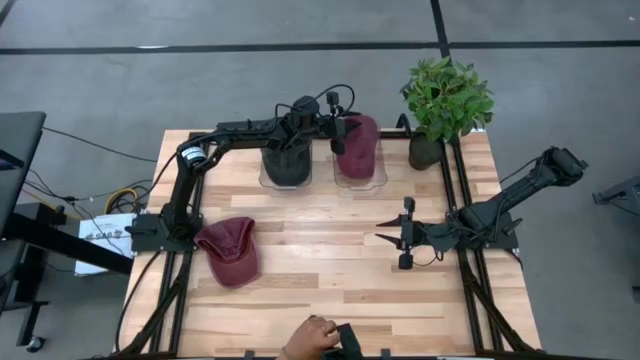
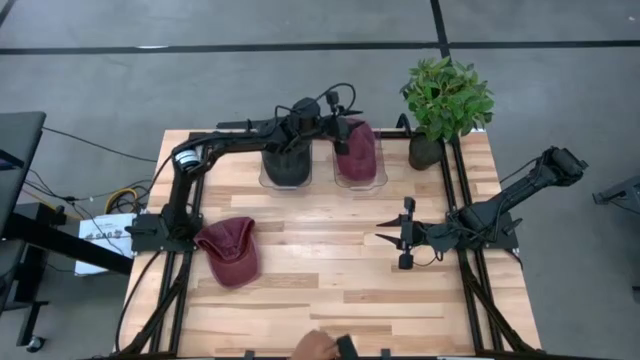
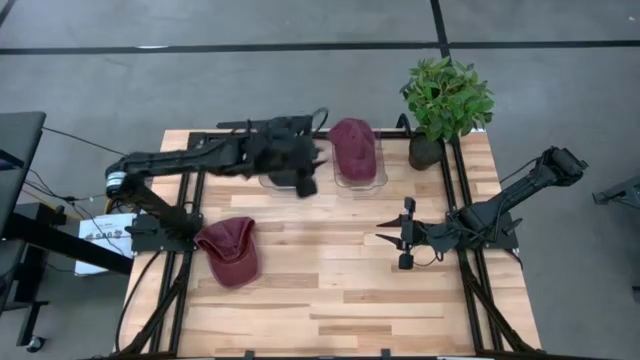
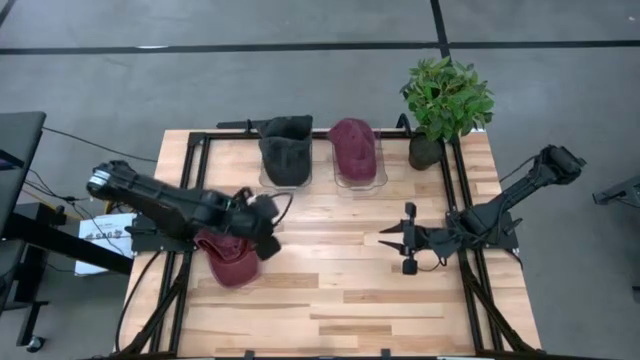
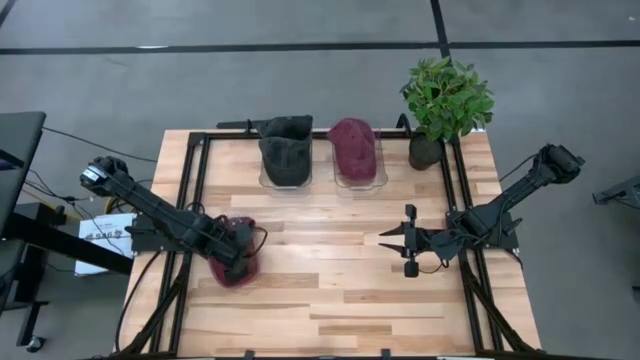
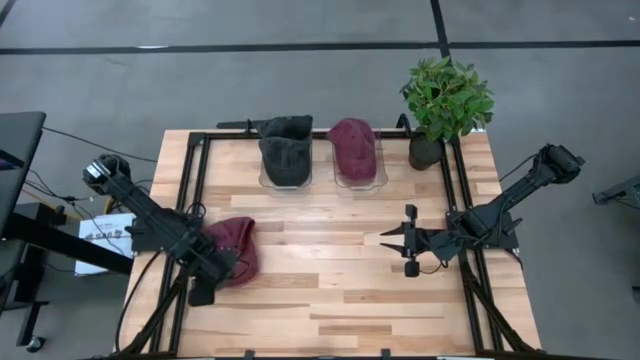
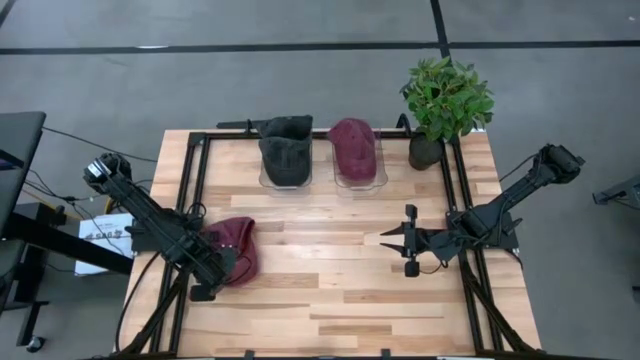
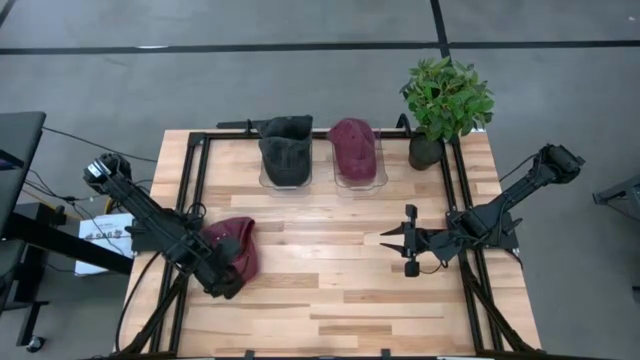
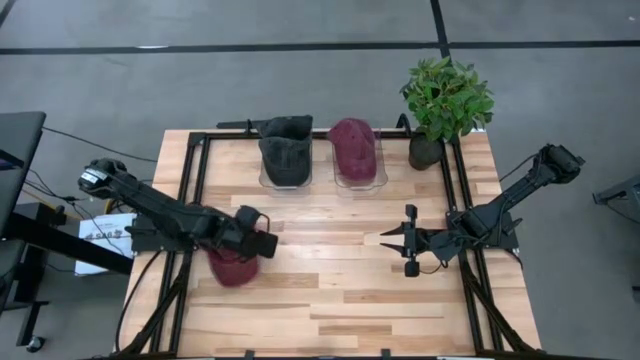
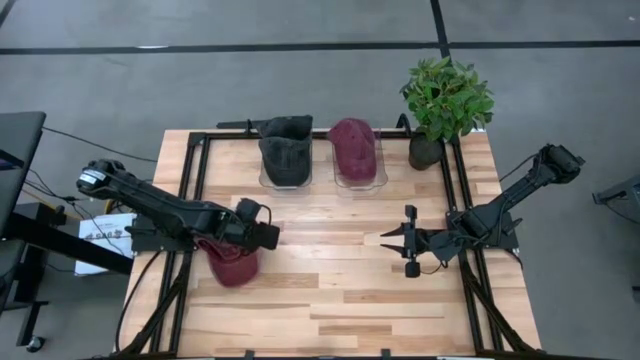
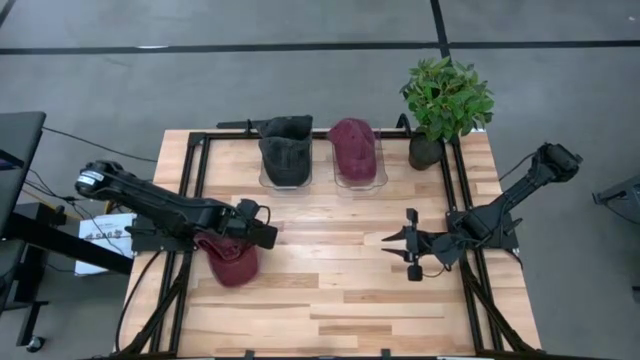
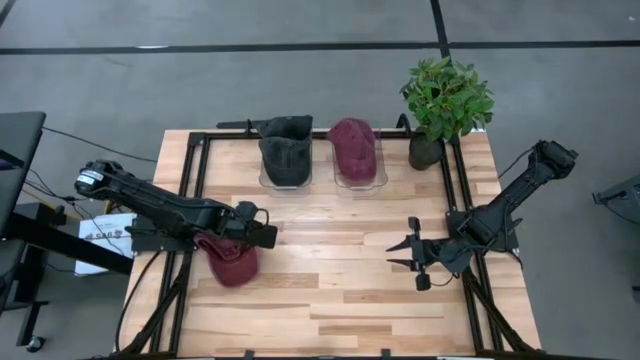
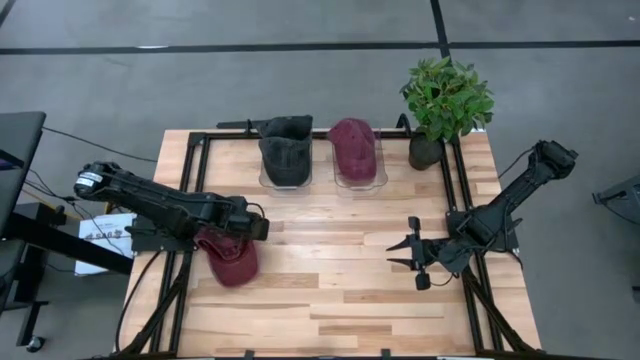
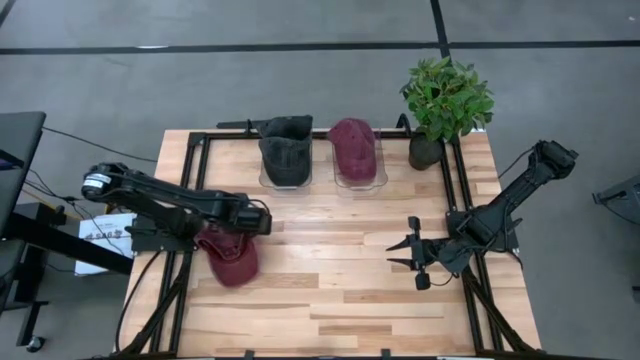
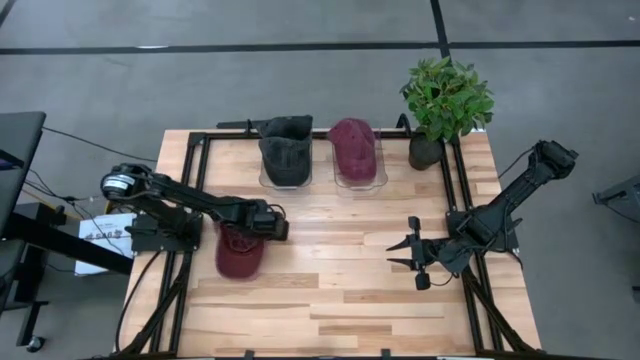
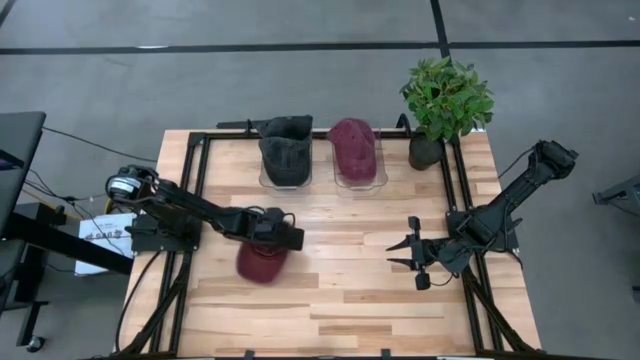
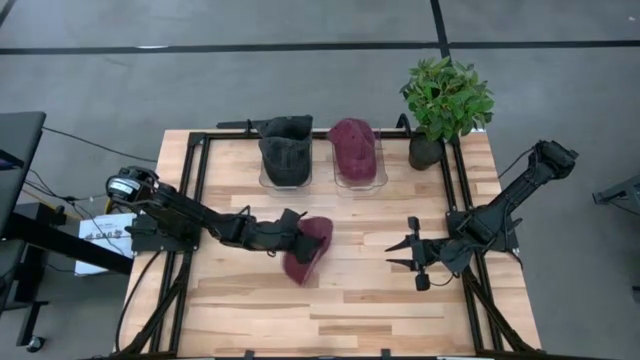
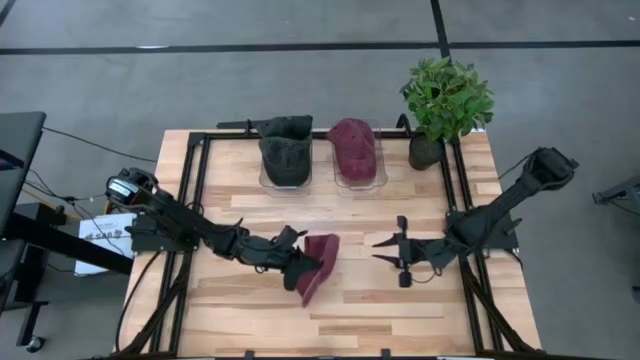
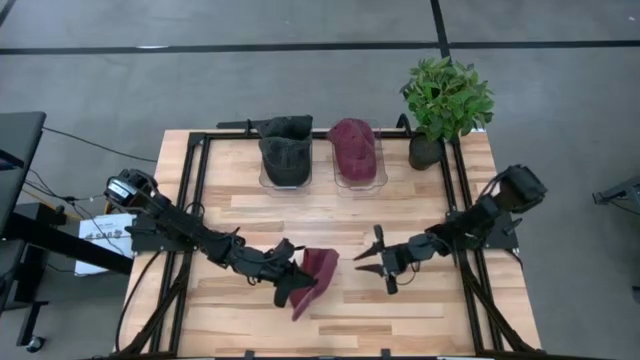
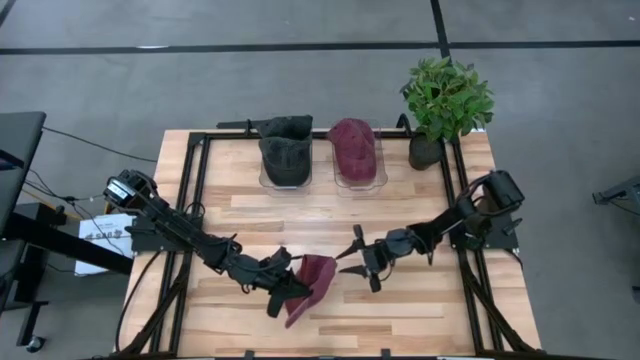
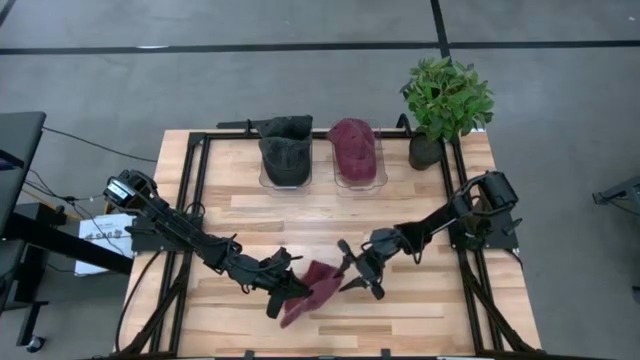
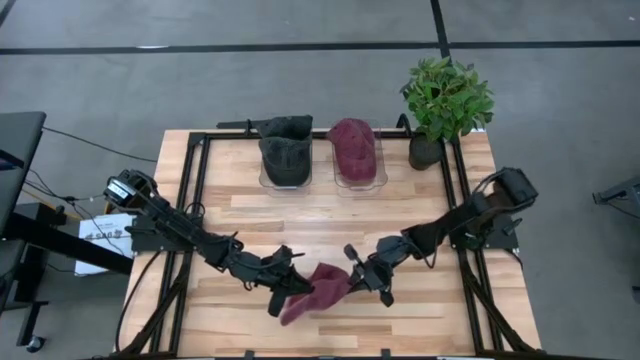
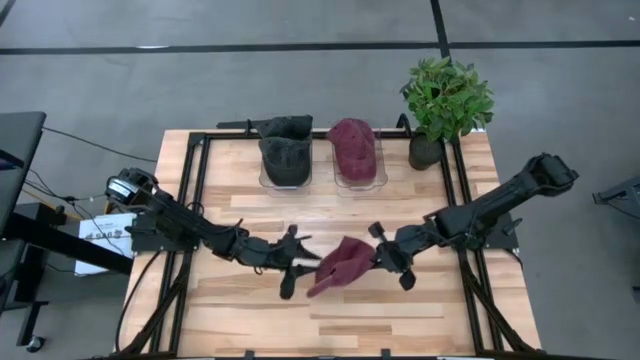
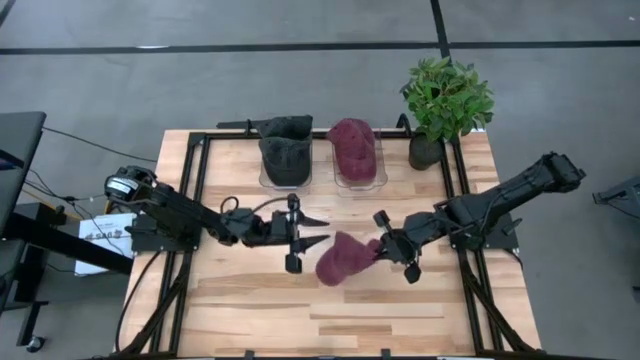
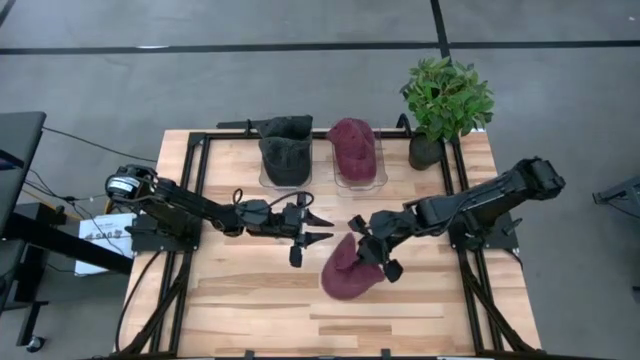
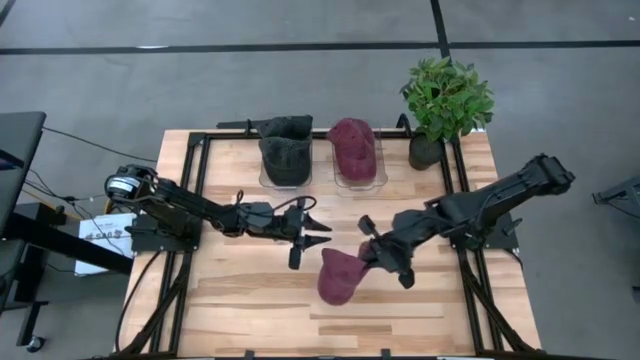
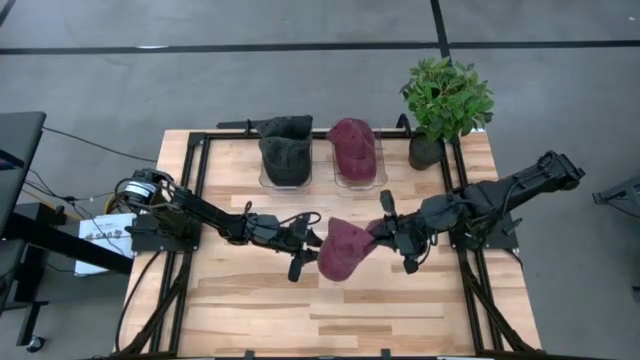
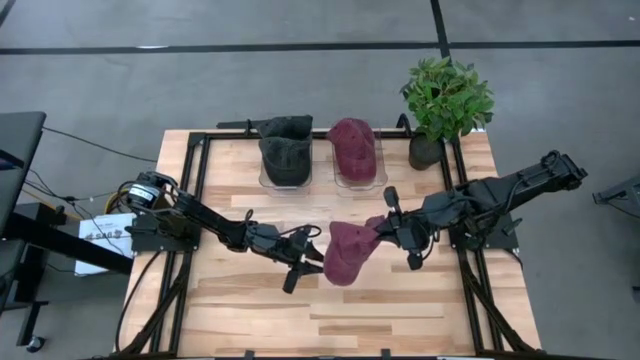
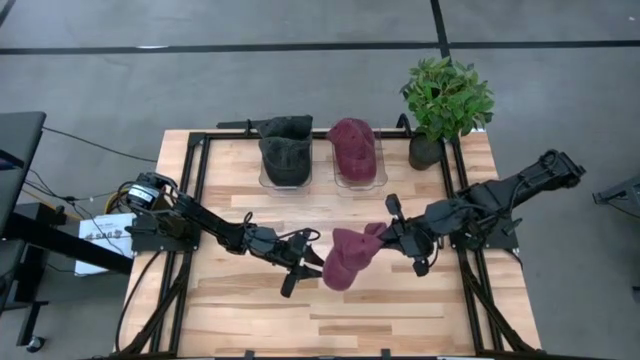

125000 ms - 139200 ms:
Task: Pick & Place hat
Put the red cap into the right transparent bin

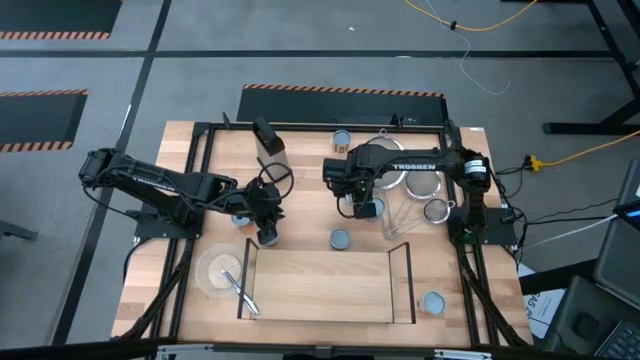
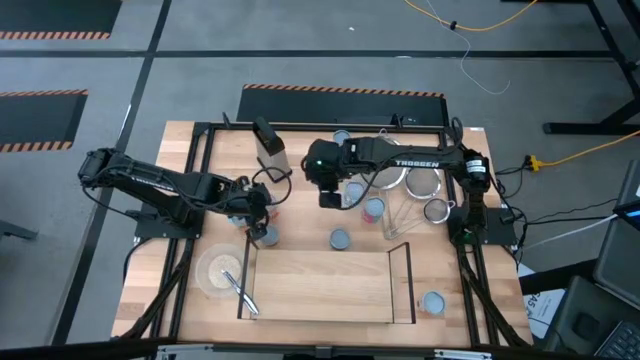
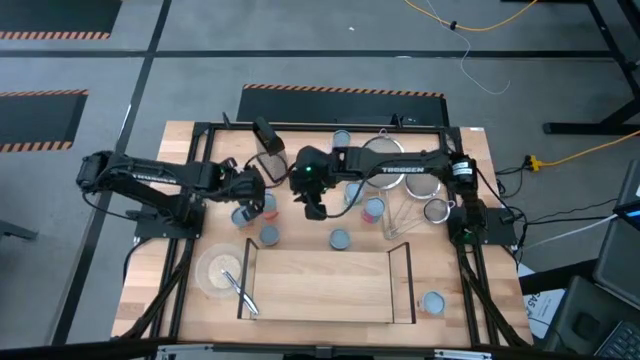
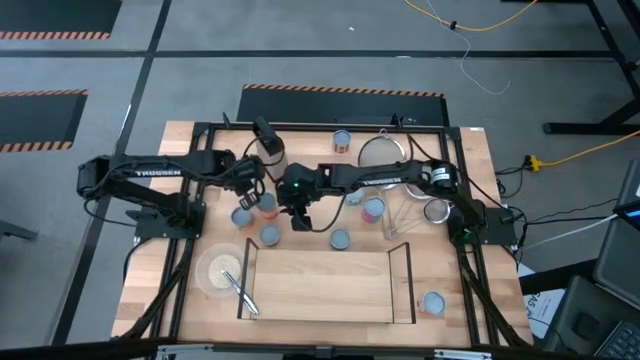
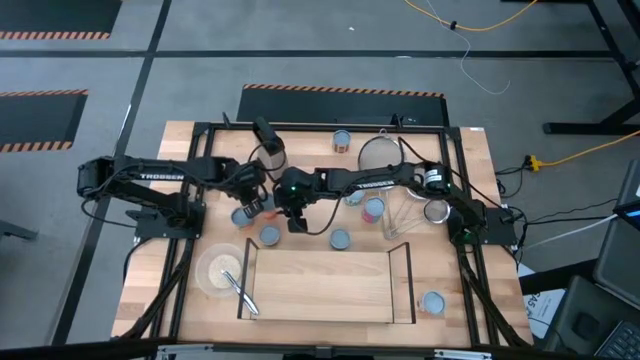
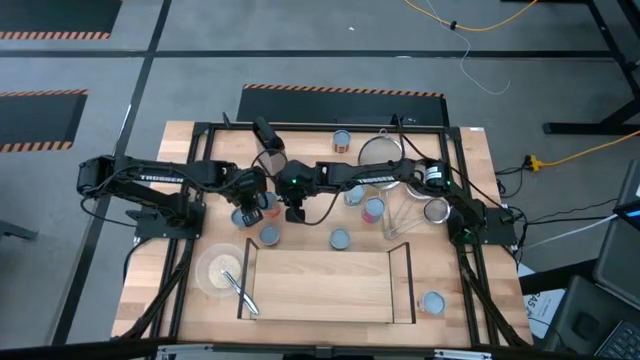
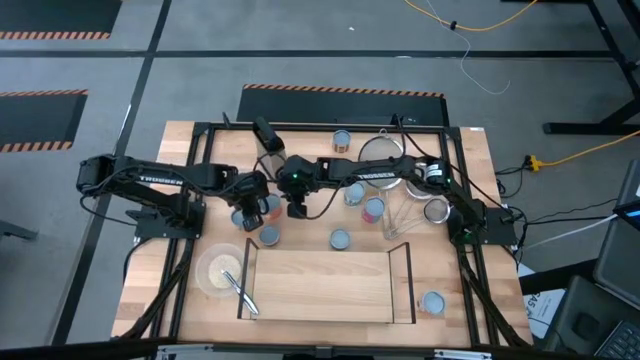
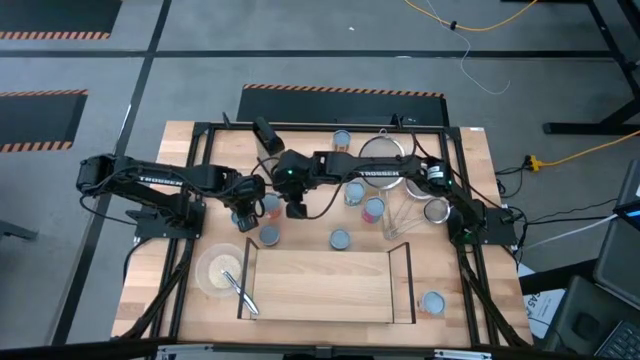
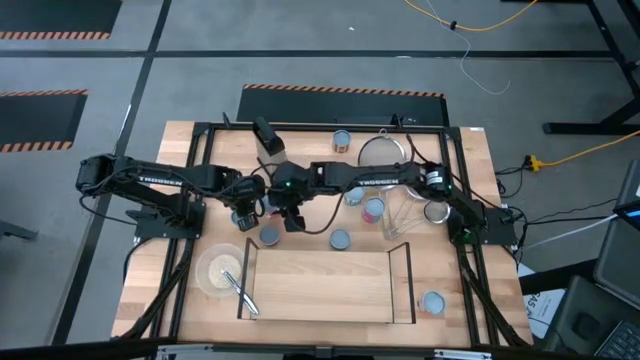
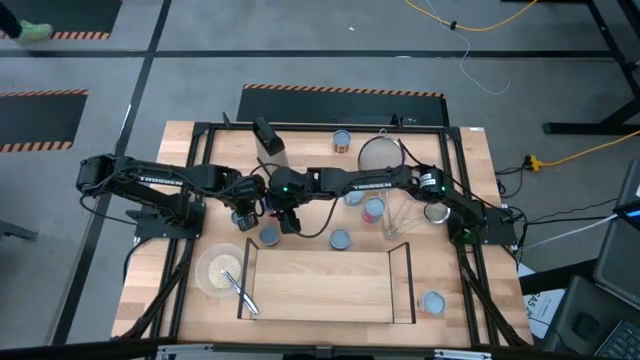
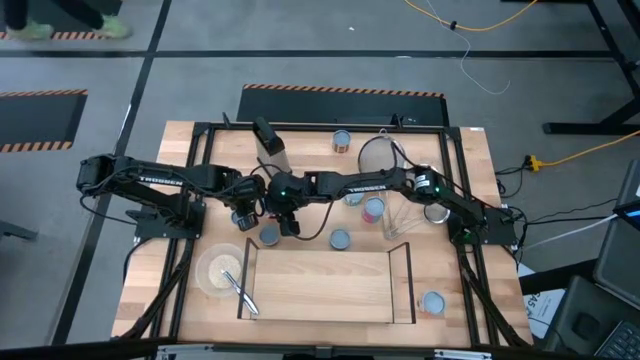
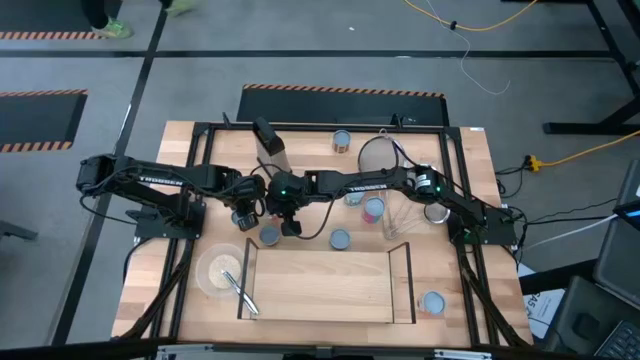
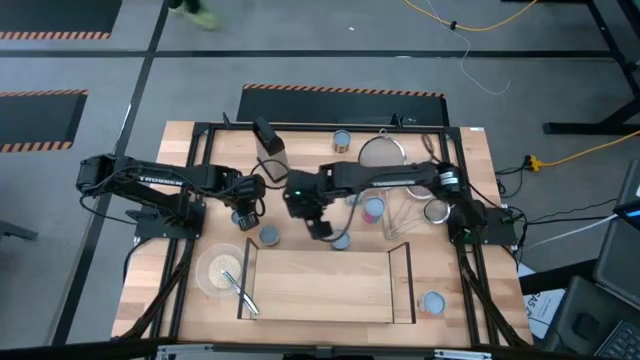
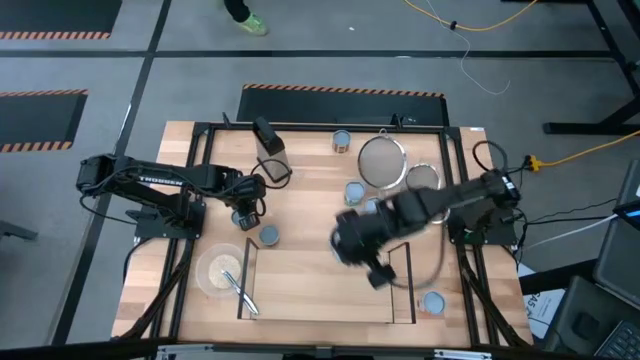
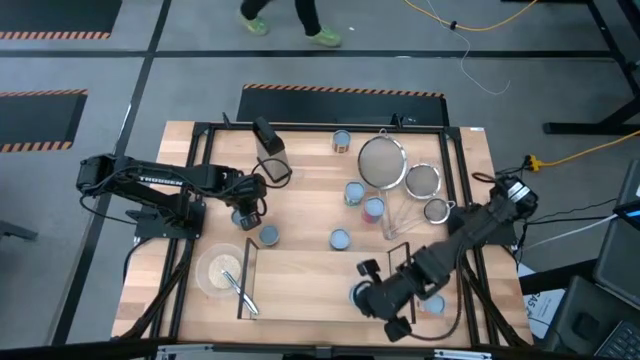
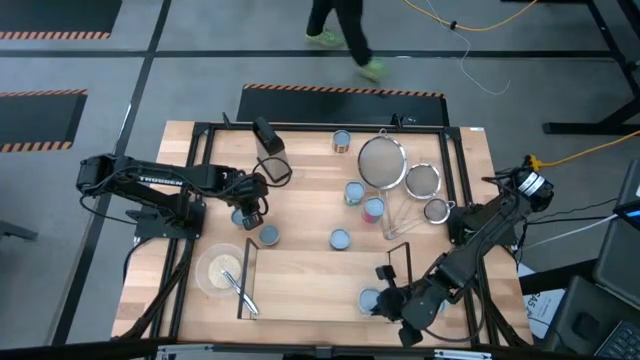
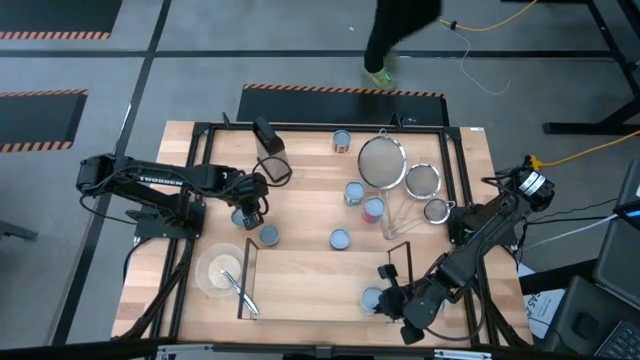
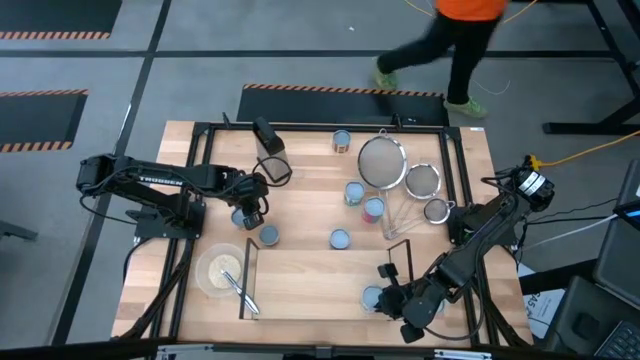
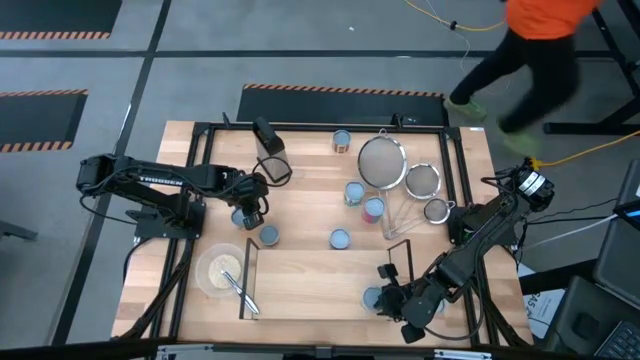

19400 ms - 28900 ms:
Task: Pick and place cans onto a shelf
Put the canned mix fruits on the shelf
